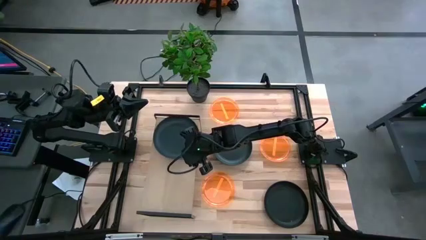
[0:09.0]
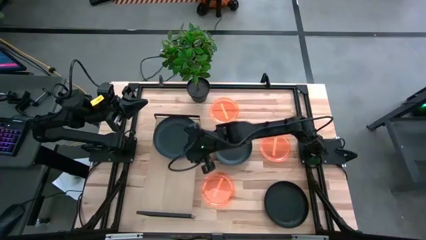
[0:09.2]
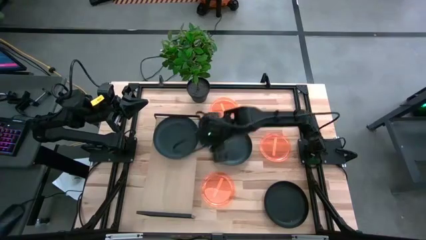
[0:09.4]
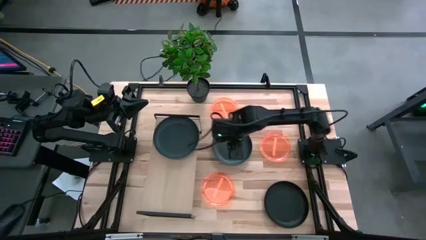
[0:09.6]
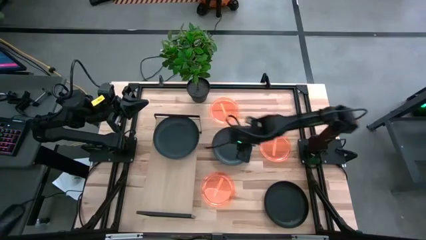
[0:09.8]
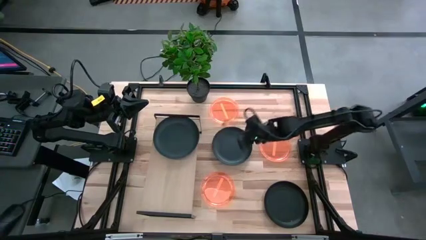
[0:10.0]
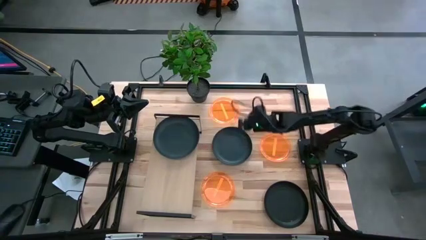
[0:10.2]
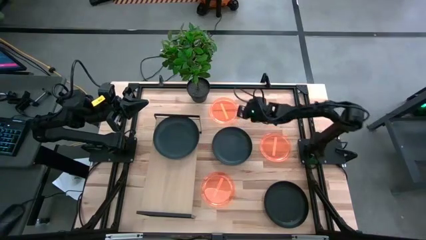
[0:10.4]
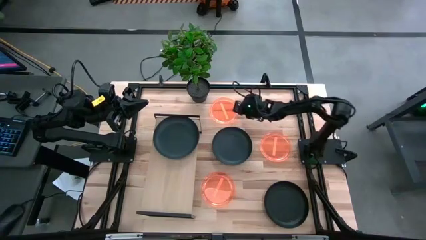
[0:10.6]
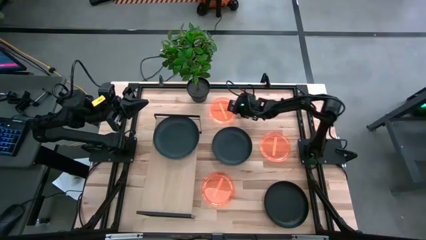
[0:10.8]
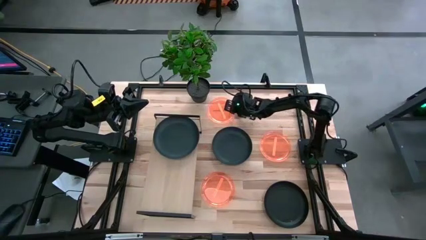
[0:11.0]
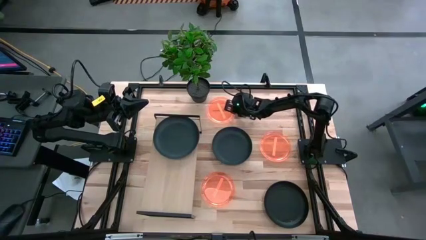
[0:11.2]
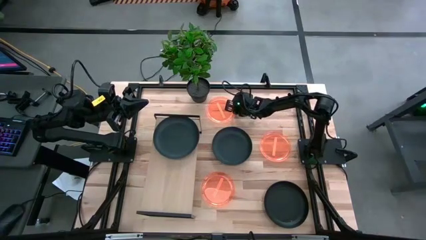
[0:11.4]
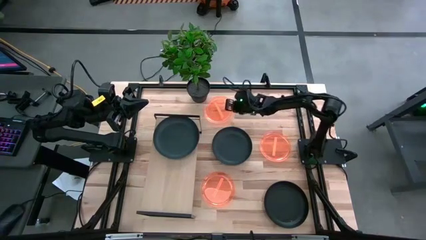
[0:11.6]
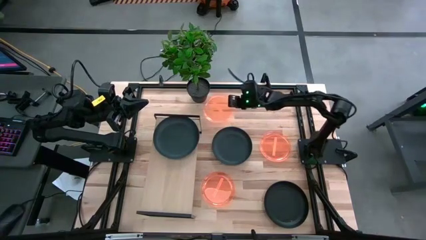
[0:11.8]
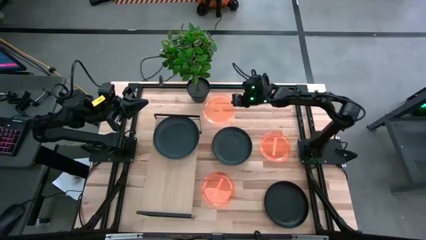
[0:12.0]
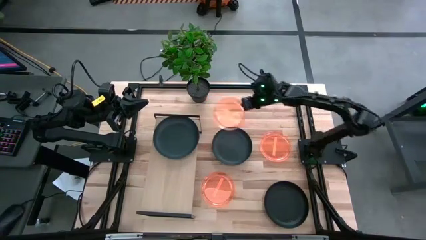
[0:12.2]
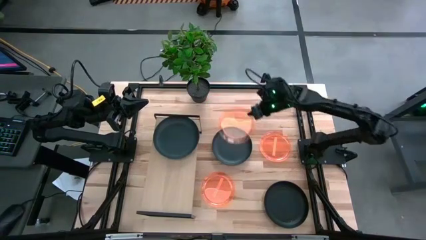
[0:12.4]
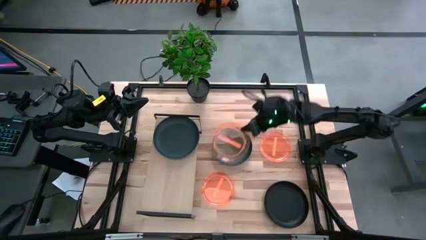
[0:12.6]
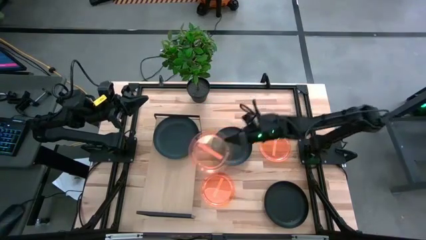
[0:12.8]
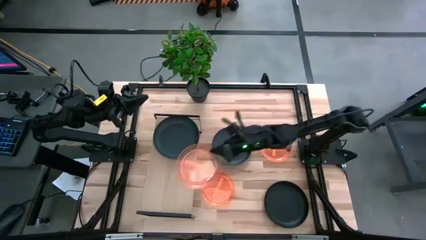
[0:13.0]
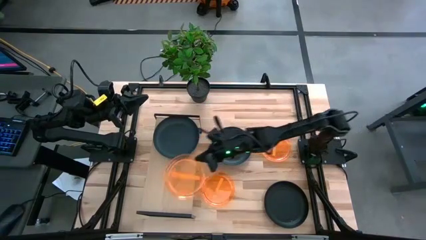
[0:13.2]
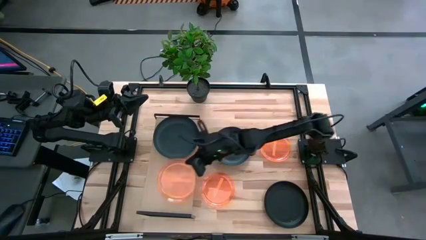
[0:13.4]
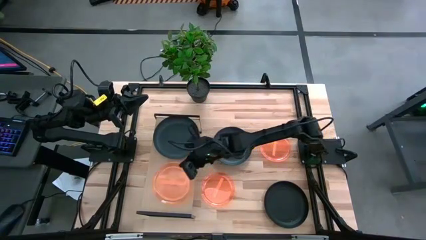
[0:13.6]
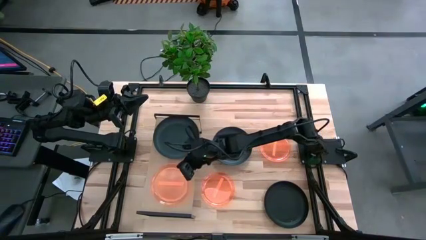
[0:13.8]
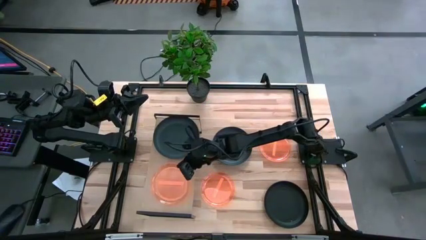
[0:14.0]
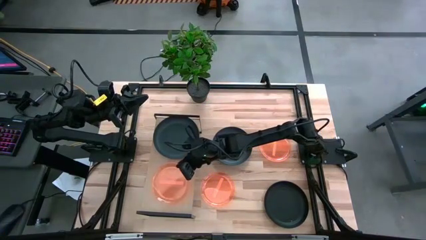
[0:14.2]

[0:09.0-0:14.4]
Task: Place and stack plates onto a shelf
Put the top orange plate on the shelf

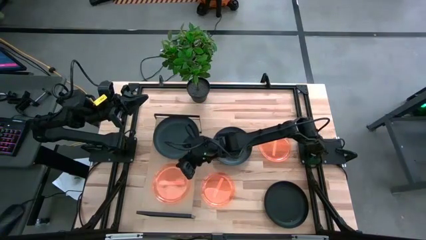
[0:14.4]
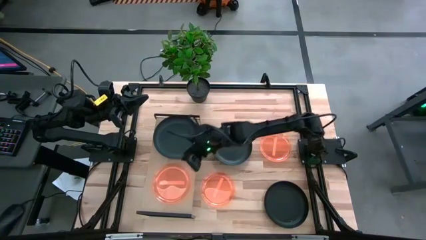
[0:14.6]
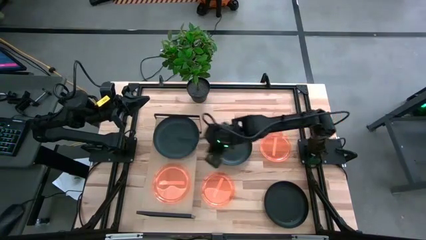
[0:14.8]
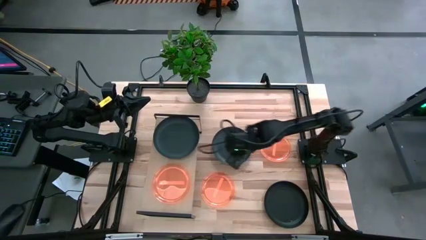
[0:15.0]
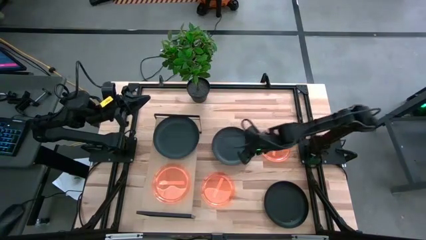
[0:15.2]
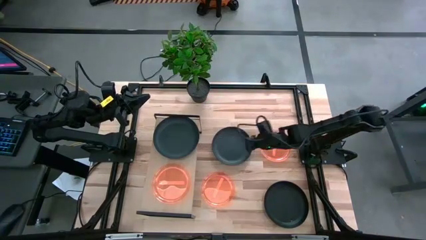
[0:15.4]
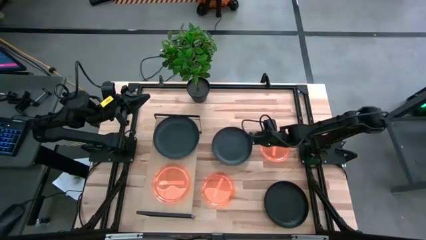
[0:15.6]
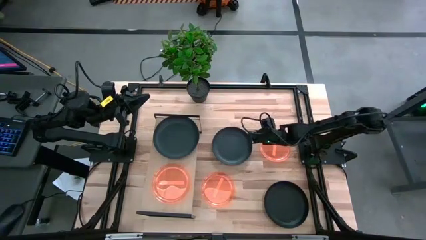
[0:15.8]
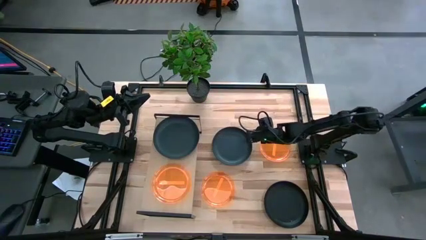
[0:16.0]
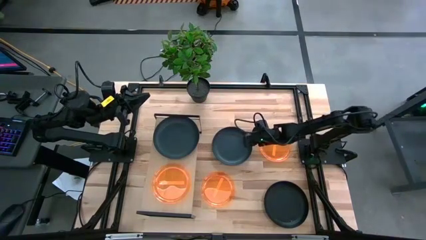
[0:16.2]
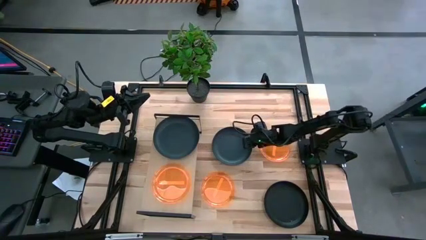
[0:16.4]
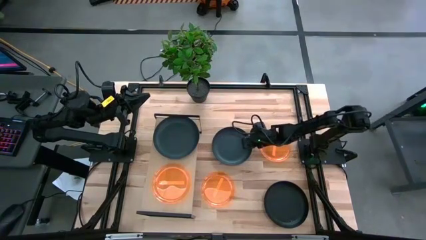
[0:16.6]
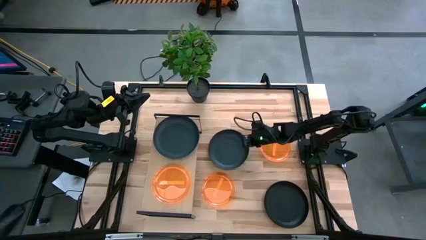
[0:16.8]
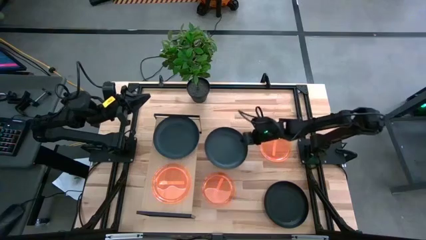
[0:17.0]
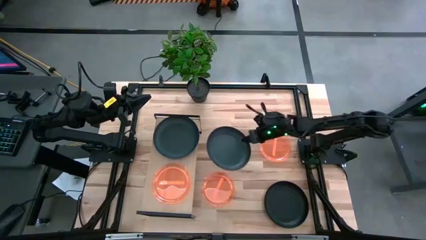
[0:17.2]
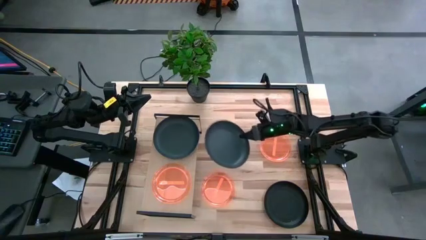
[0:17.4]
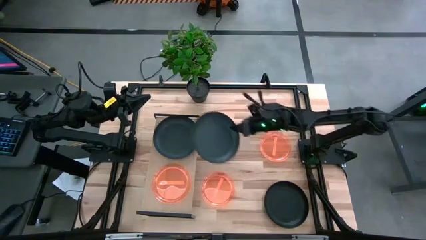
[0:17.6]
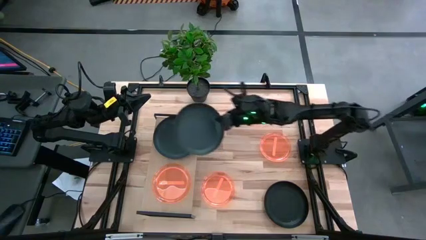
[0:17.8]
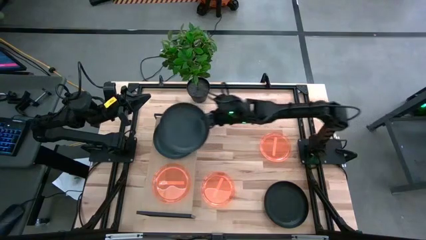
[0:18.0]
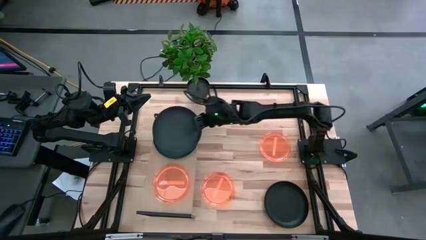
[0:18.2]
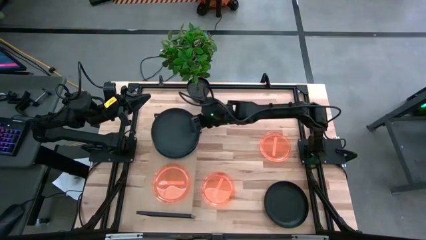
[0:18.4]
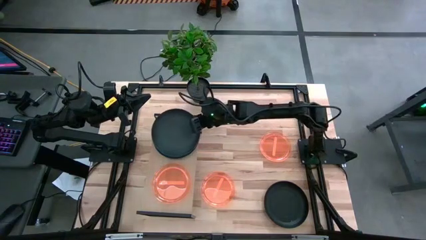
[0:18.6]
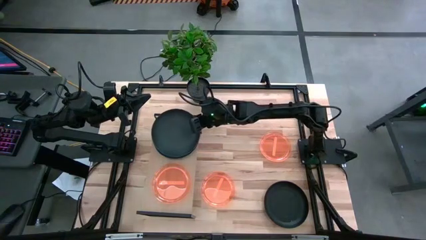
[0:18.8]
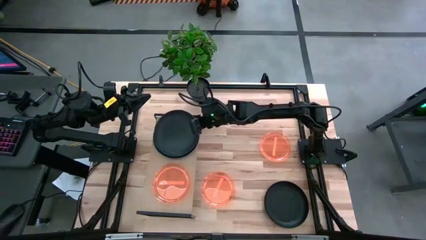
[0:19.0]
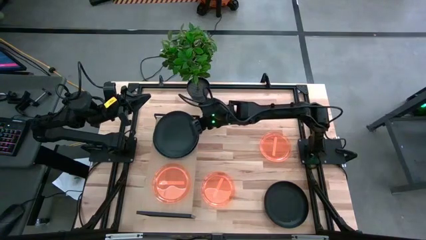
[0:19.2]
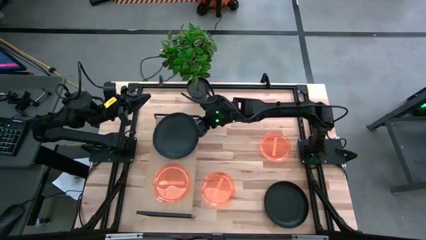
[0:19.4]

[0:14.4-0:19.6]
Stack the top black plate on top of the black plate on the shelf

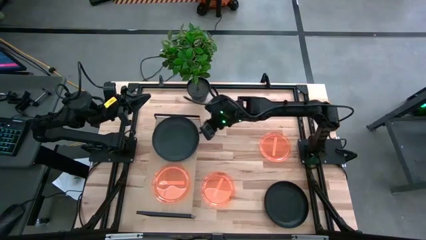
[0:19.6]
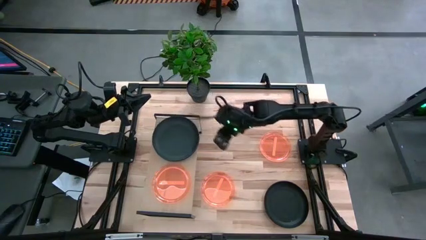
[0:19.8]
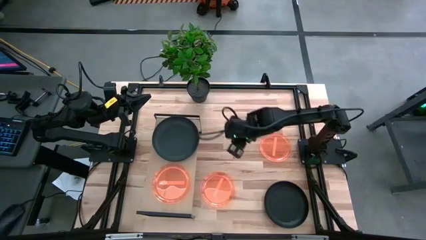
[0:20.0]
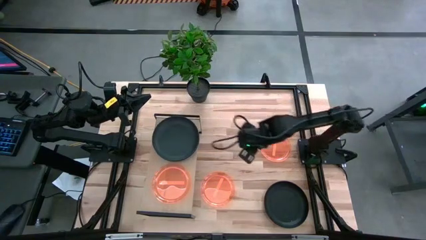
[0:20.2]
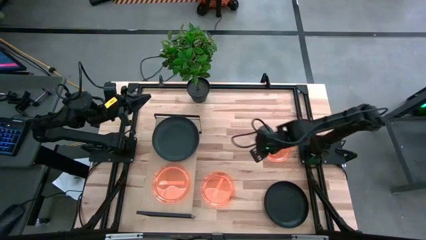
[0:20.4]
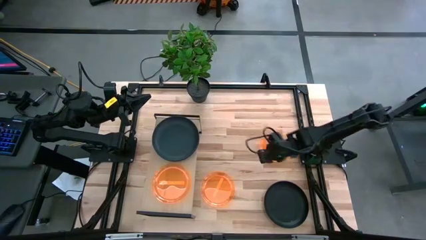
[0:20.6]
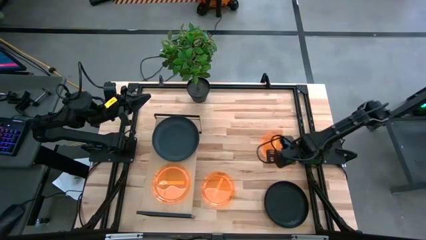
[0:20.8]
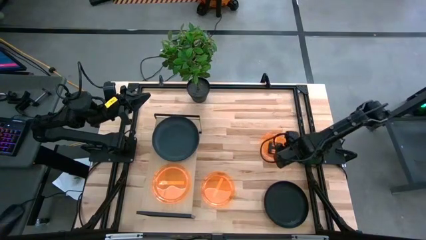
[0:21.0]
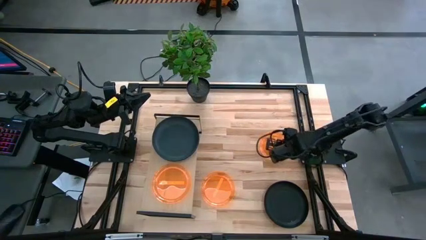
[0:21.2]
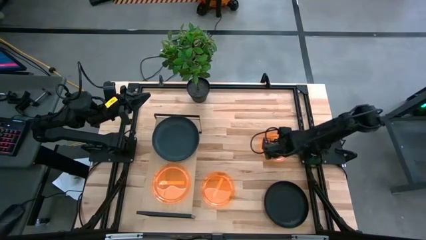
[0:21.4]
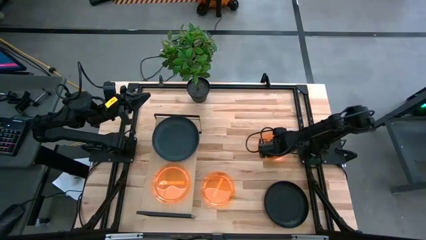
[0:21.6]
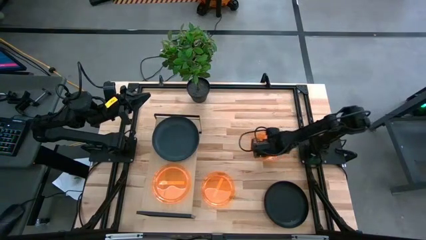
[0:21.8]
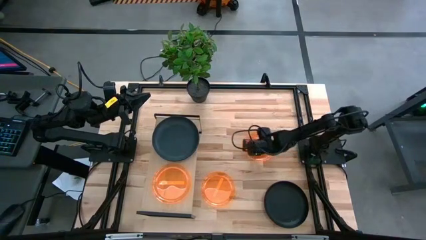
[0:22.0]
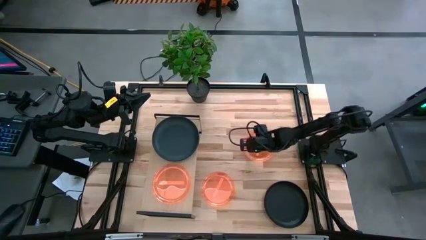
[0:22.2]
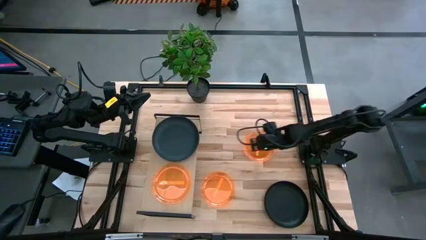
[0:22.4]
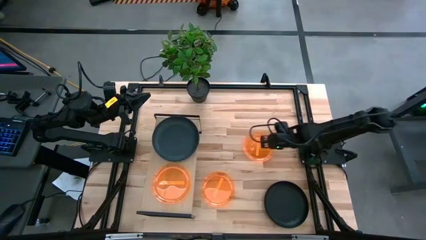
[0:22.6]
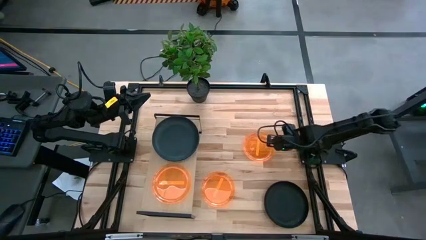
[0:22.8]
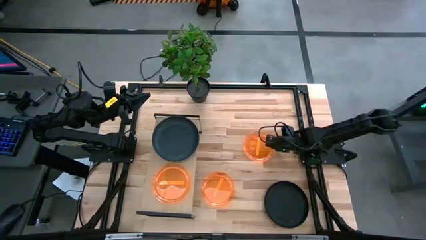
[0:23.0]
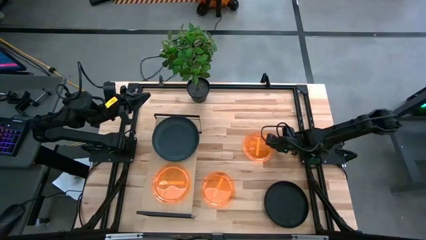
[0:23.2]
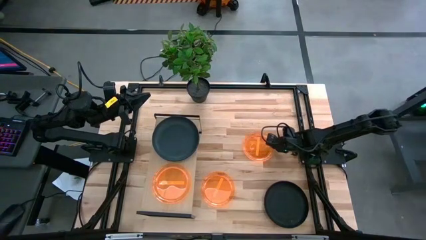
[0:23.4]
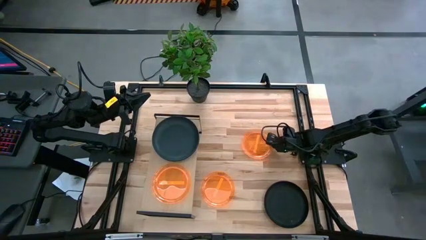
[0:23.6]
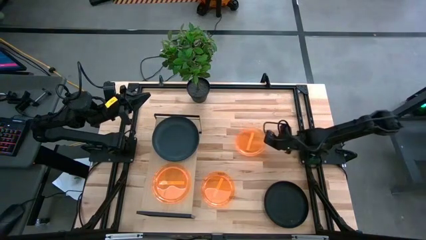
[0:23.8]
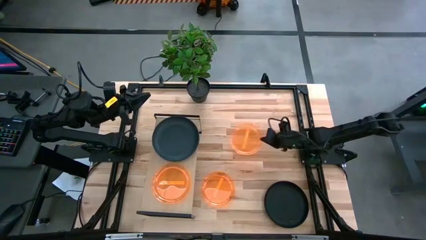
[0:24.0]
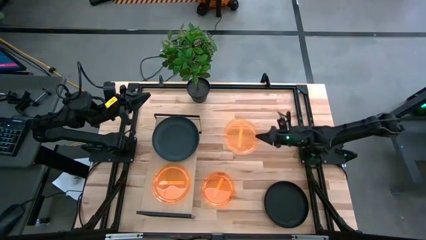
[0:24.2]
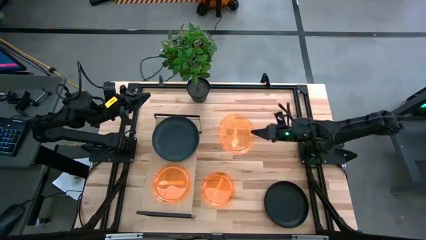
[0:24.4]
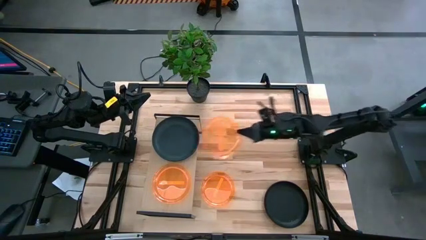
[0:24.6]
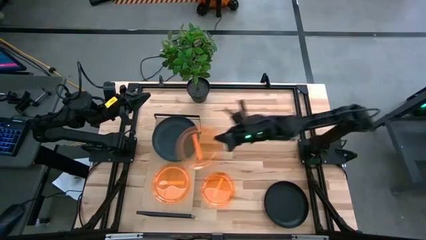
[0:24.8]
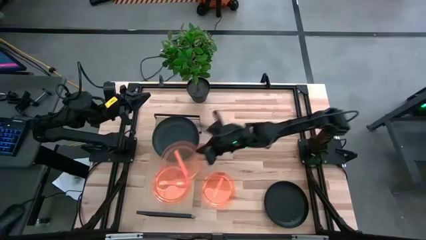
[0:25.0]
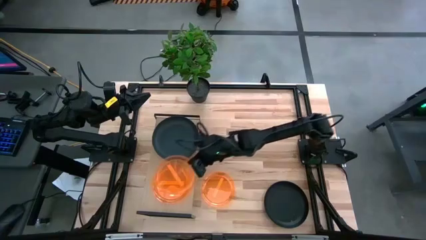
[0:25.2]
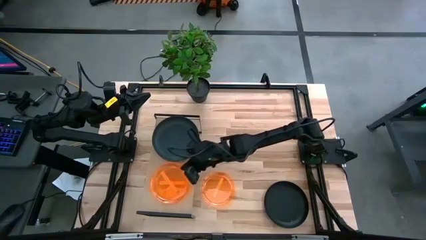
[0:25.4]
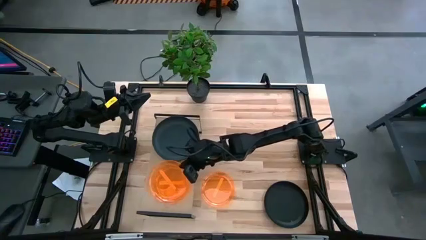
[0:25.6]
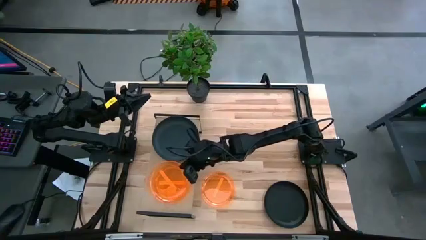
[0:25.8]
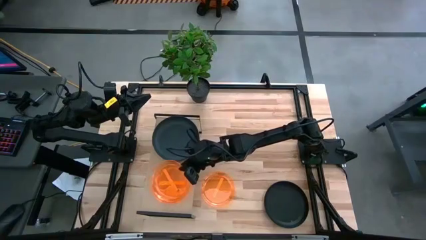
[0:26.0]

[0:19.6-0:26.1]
Stack the top orange plate on top of the orange plate on the shelf
